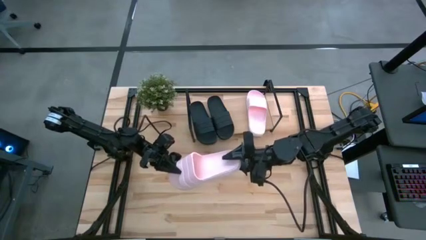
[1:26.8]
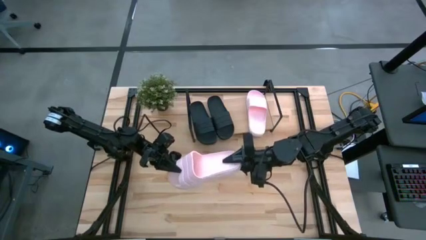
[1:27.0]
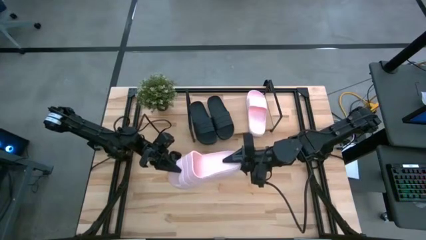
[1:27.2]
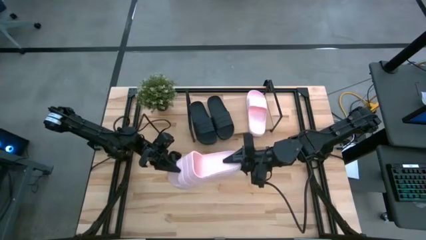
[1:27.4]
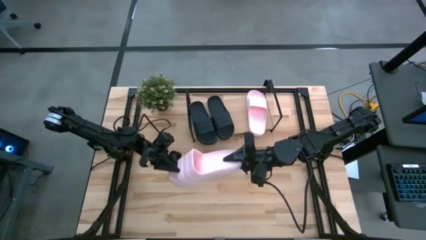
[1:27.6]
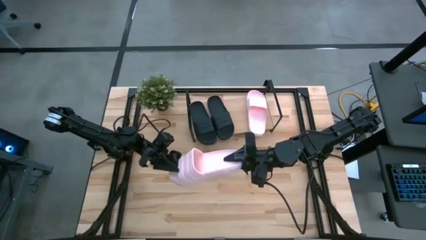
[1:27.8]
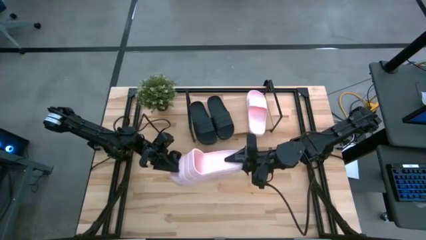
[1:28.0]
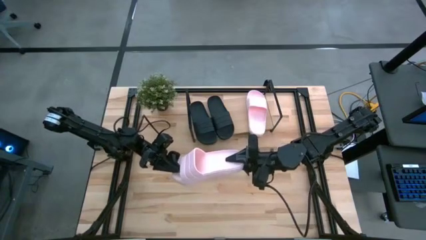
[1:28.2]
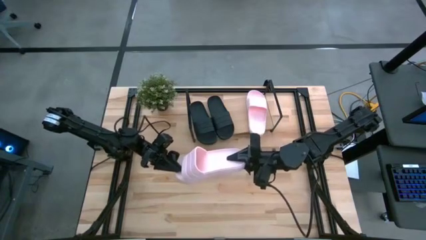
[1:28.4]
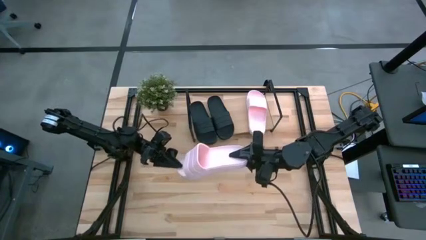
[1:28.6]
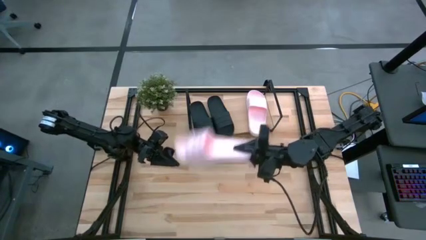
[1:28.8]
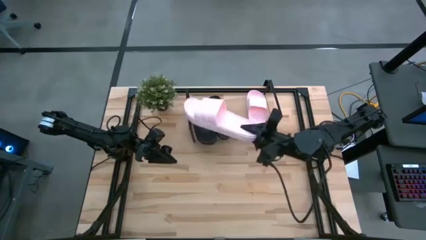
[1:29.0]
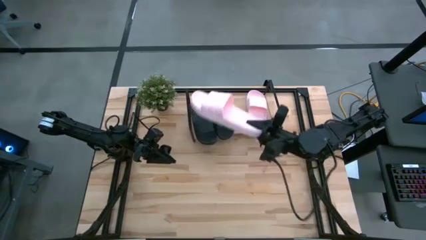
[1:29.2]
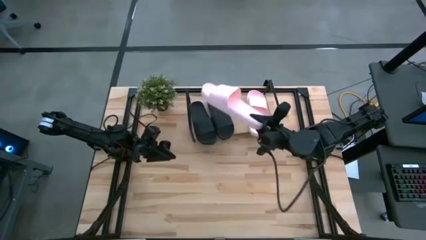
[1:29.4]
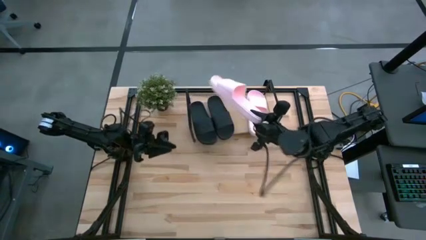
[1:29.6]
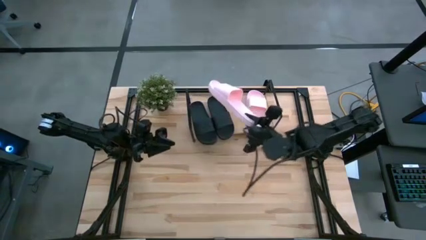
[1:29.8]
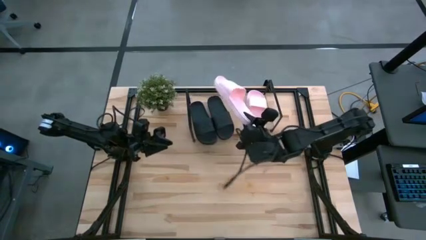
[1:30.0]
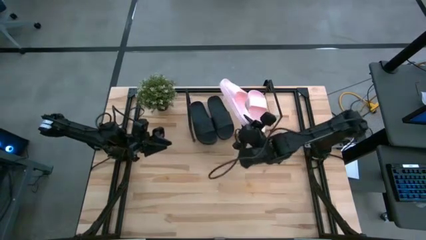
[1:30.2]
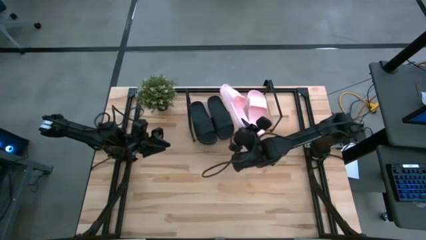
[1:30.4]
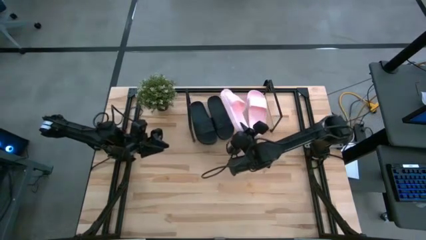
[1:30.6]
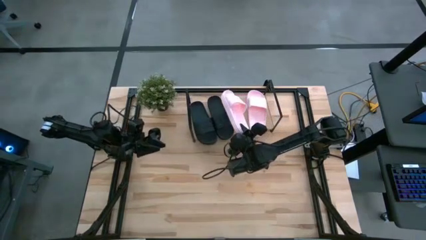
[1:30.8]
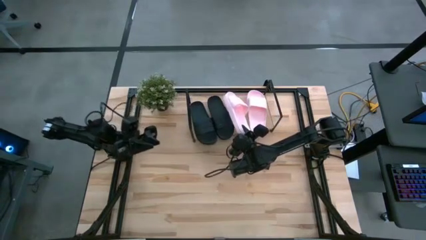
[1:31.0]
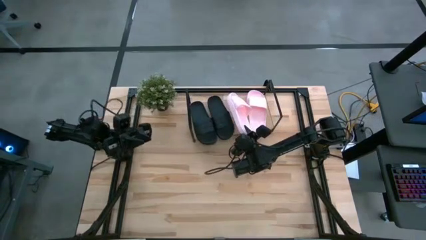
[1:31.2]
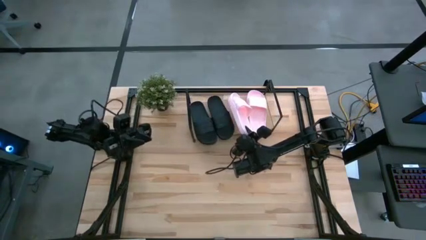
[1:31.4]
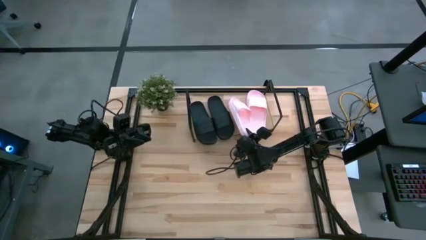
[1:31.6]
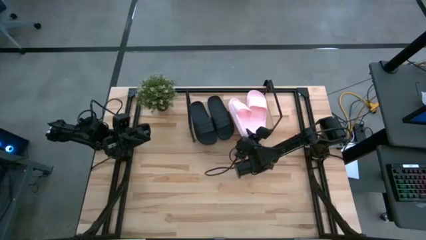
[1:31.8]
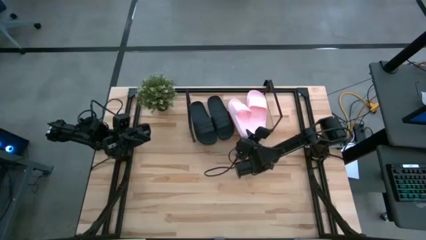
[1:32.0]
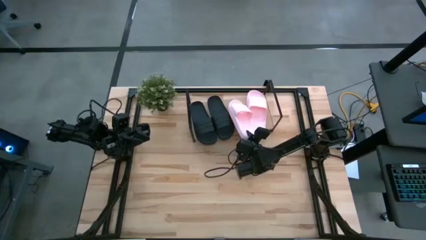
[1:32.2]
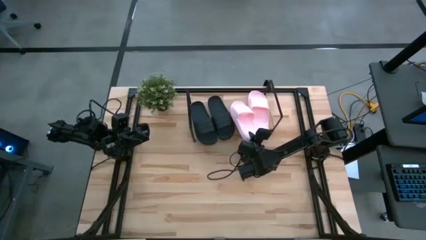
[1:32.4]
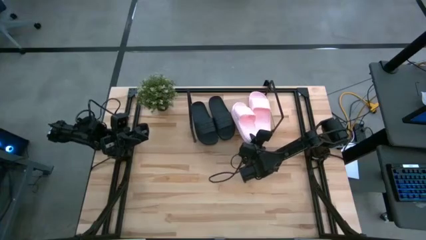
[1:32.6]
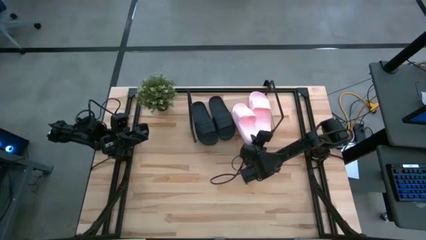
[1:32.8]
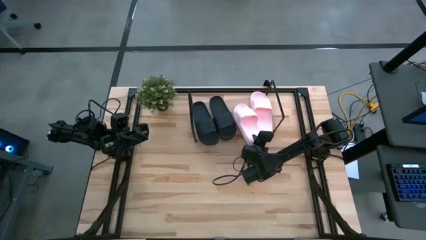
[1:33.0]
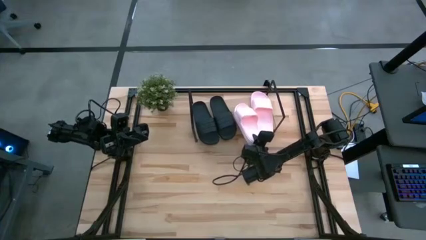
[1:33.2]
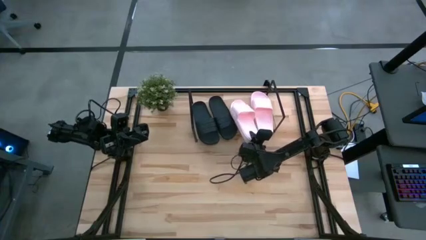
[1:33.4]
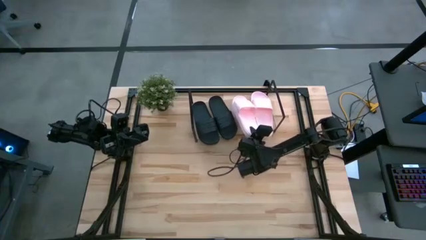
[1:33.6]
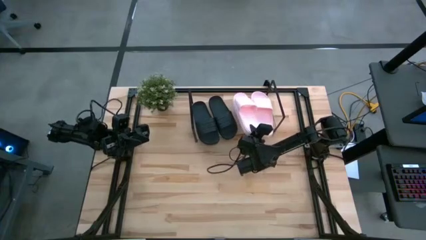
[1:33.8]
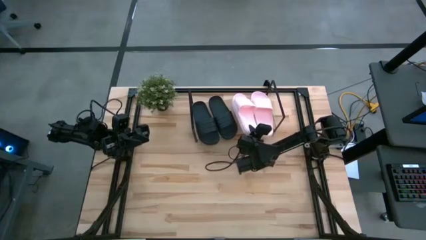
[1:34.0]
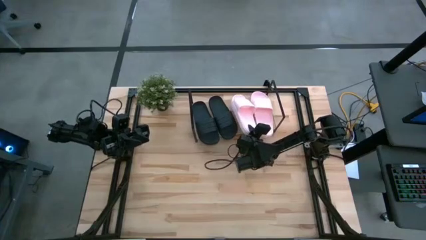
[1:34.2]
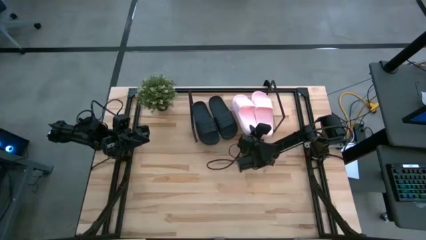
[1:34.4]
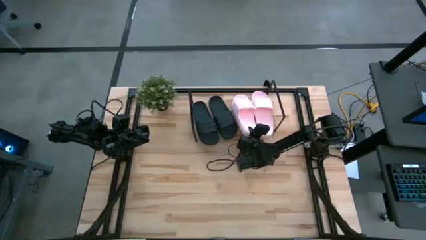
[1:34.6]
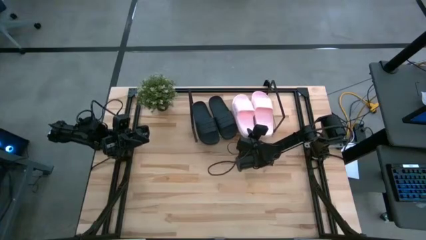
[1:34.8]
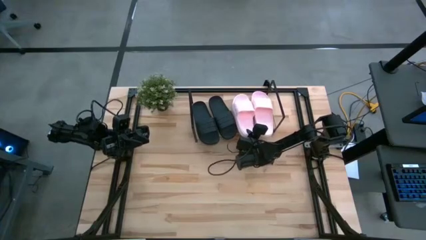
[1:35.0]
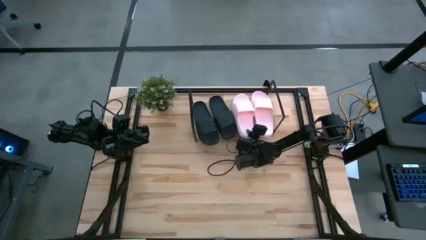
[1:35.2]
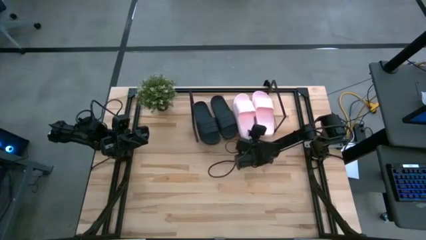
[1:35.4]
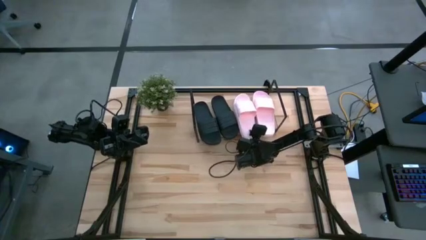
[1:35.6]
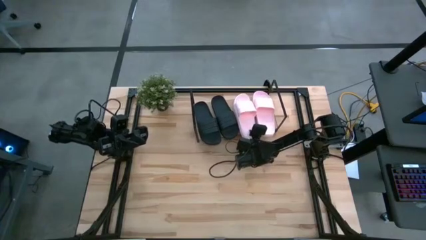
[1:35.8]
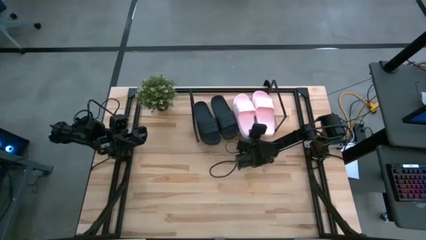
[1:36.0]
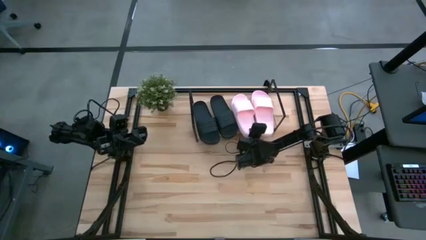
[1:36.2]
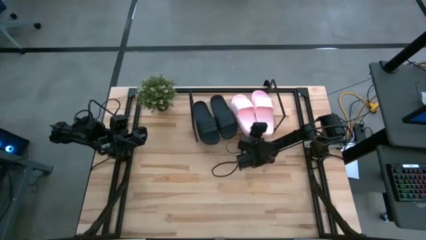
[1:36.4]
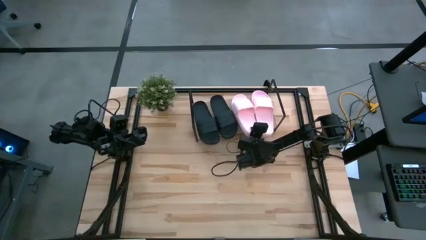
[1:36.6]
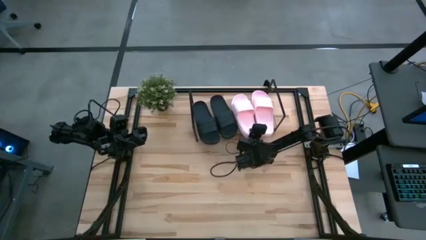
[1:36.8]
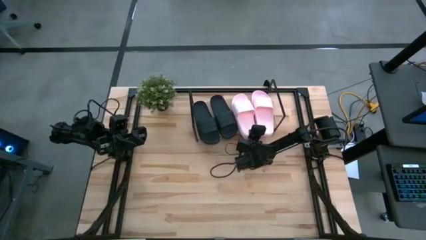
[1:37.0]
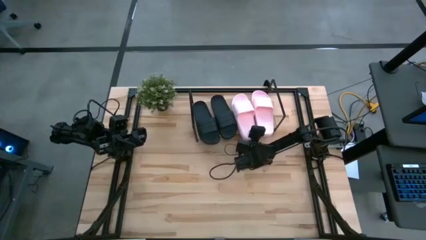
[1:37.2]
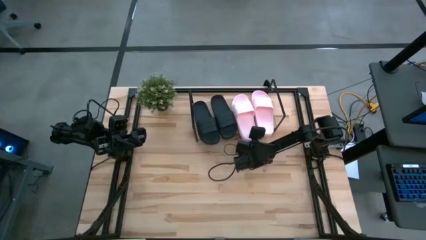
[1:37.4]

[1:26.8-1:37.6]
Task: Pick and place slides into the shelf
Put the pink slipper on the shelf
